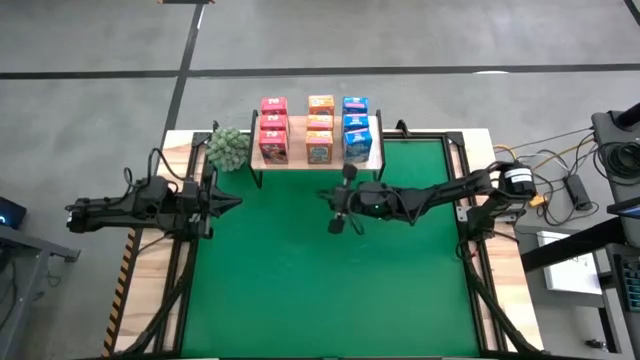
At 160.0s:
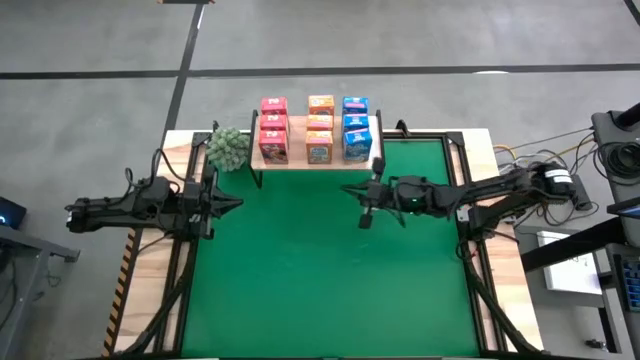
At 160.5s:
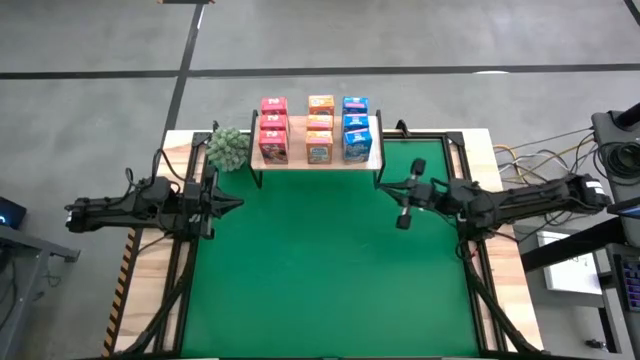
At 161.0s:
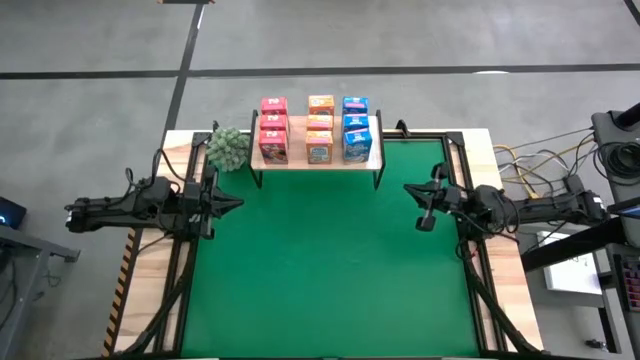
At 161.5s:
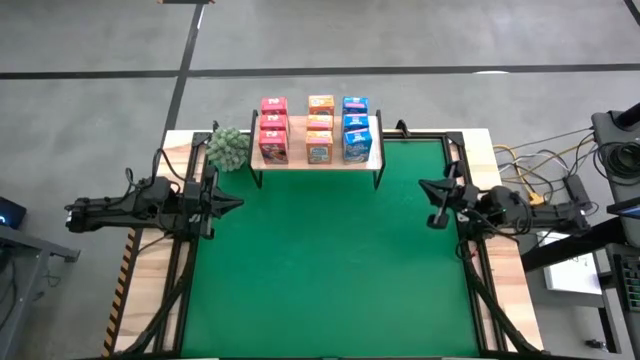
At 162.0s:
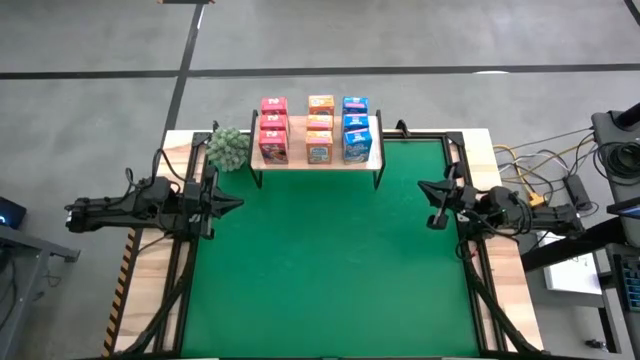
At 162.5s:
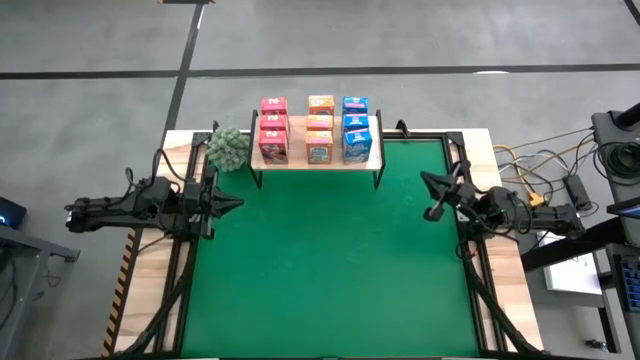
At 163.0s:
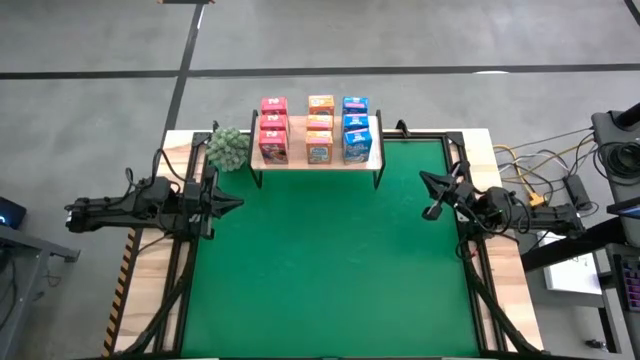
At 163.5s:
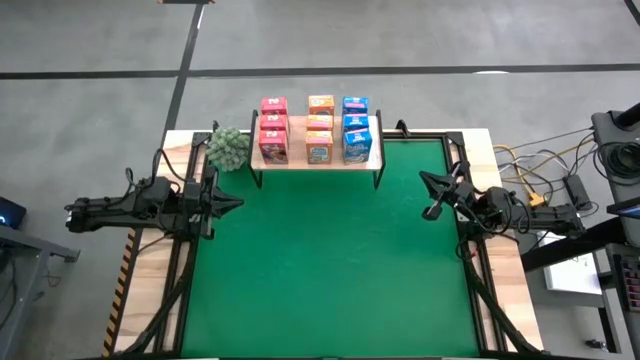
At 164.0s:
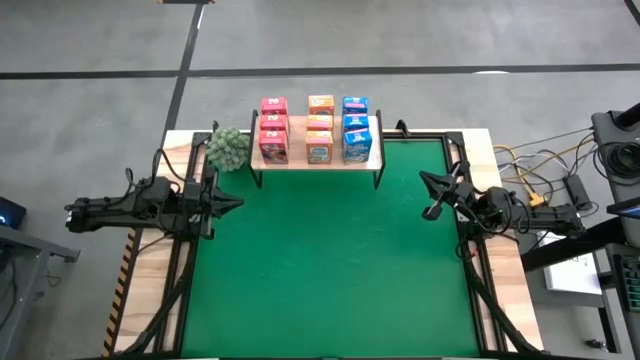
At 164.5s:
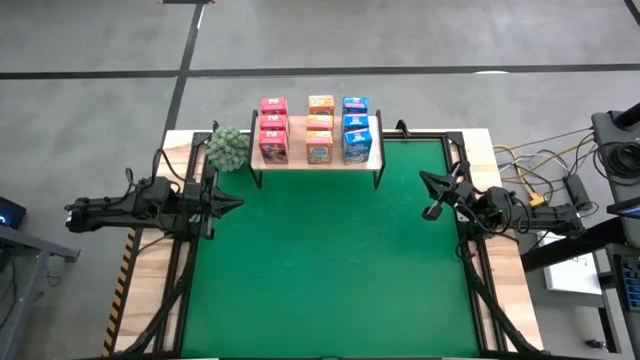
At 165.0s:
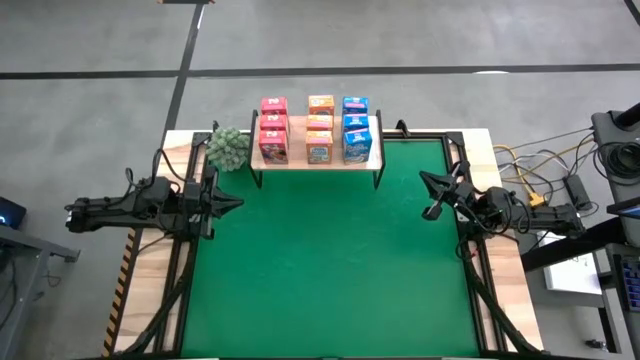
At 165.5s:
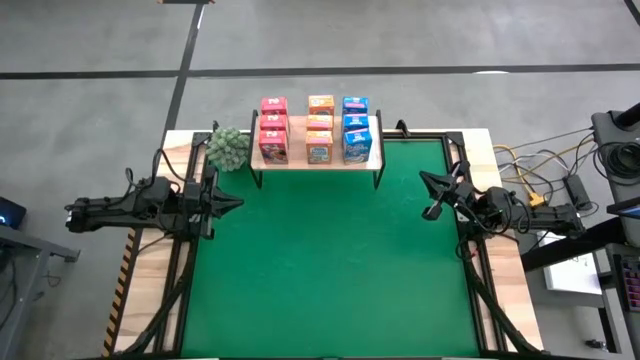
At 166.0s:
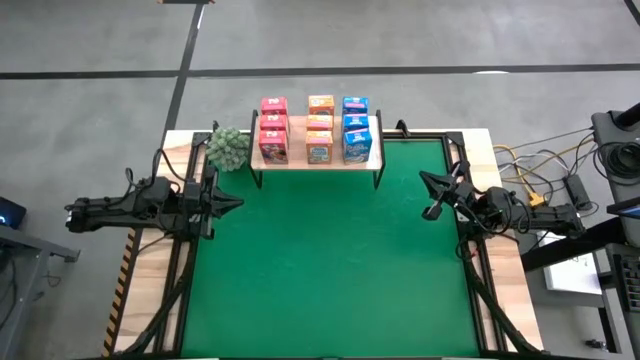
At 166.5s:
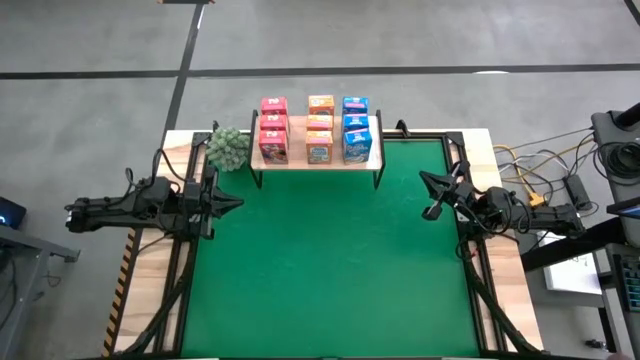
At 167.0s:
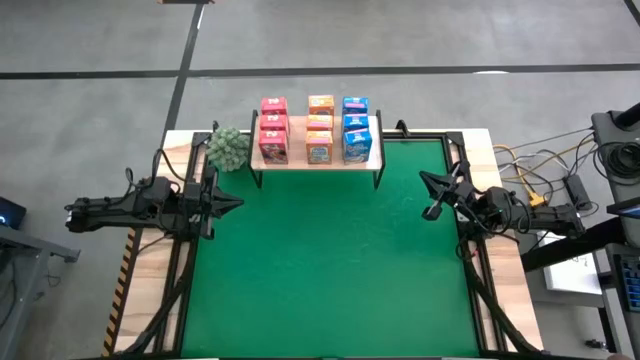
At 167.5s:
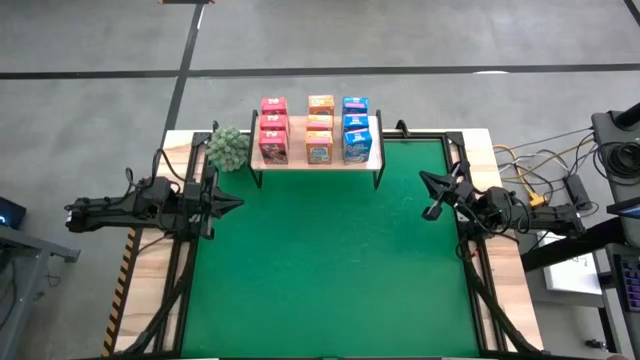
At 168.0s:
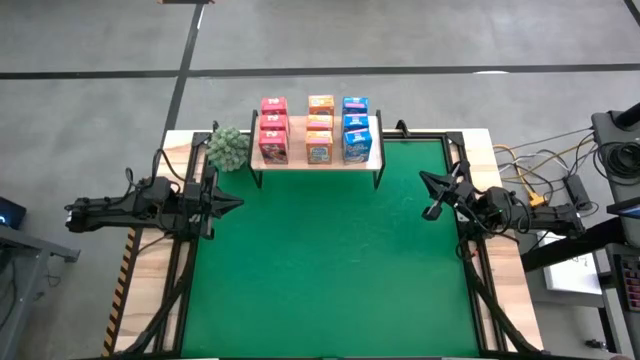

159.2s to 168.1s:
Task: Stack cereal on shelf
Return to home position

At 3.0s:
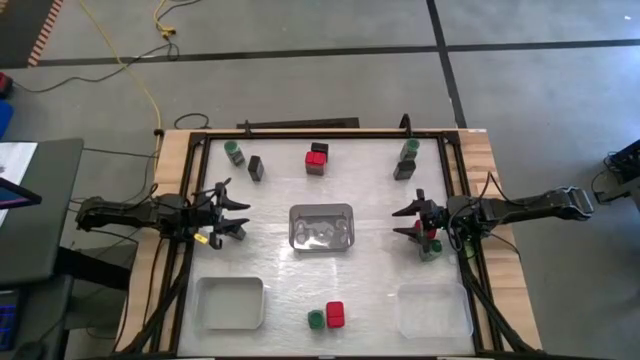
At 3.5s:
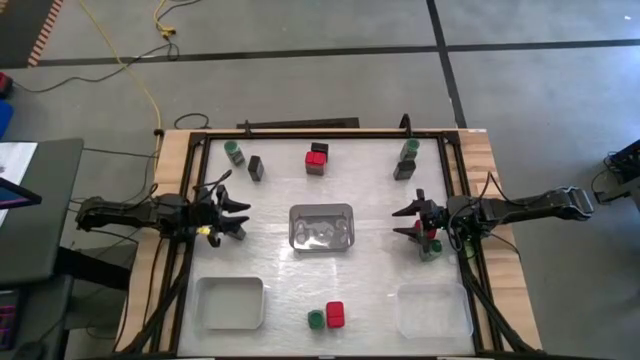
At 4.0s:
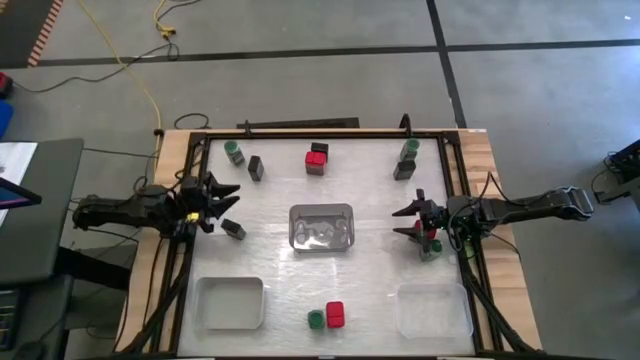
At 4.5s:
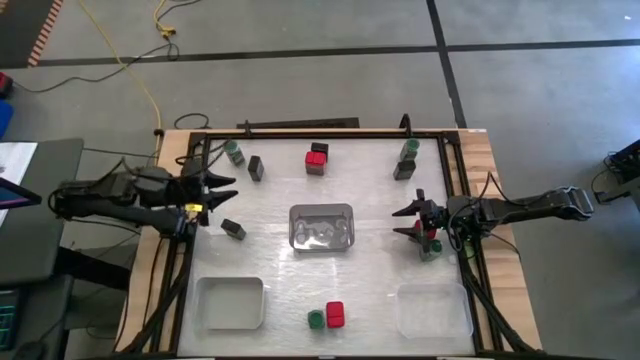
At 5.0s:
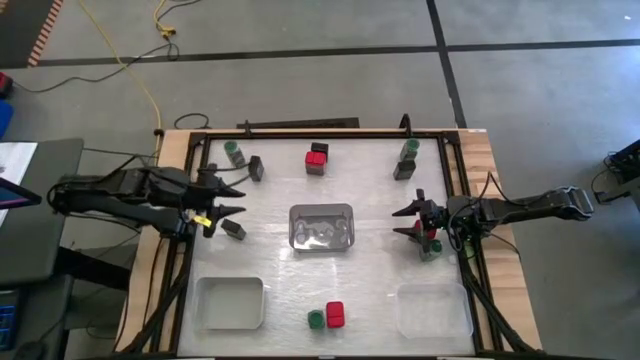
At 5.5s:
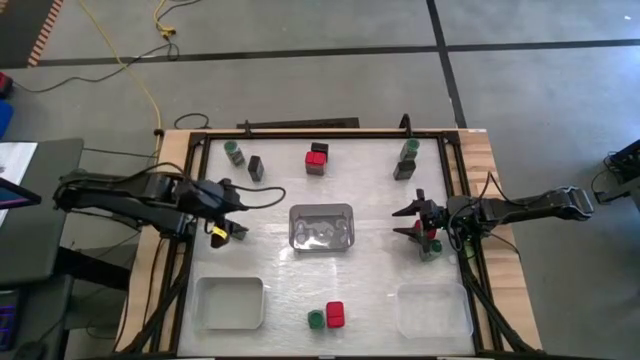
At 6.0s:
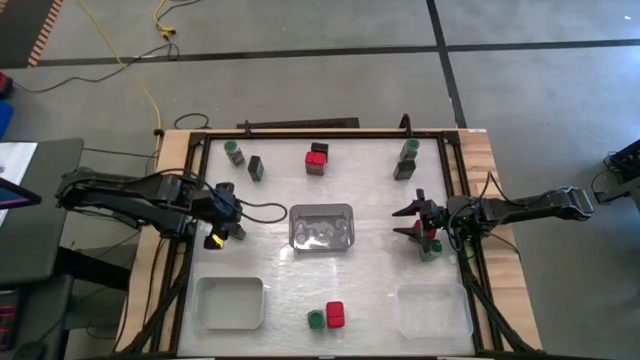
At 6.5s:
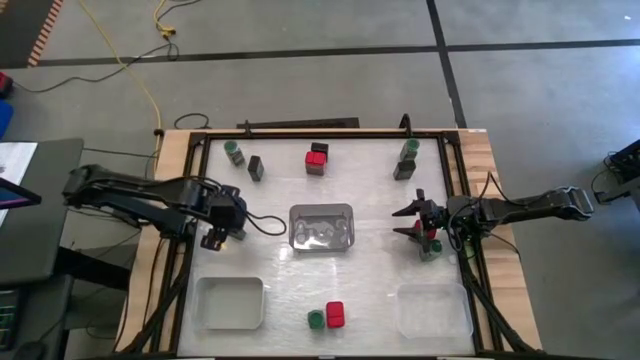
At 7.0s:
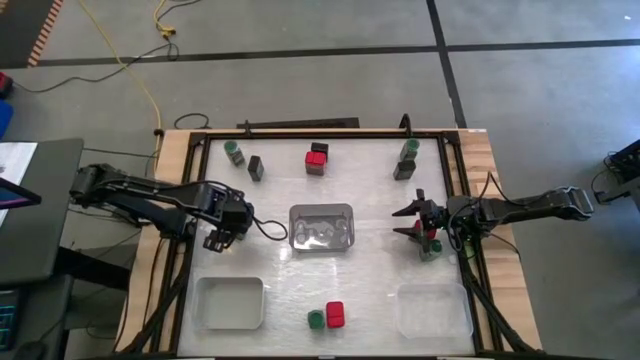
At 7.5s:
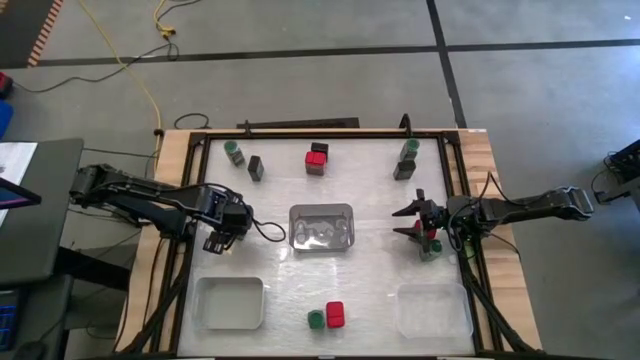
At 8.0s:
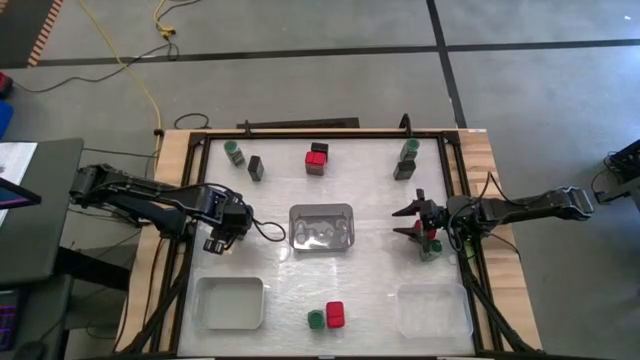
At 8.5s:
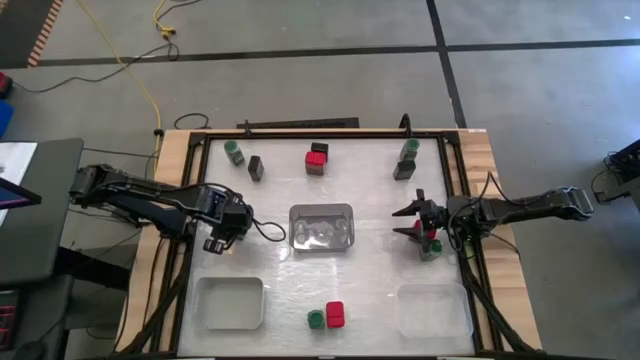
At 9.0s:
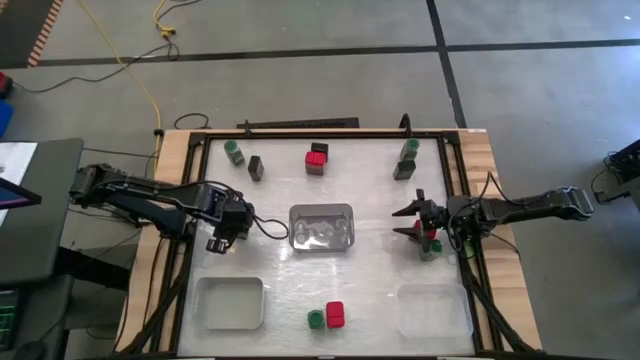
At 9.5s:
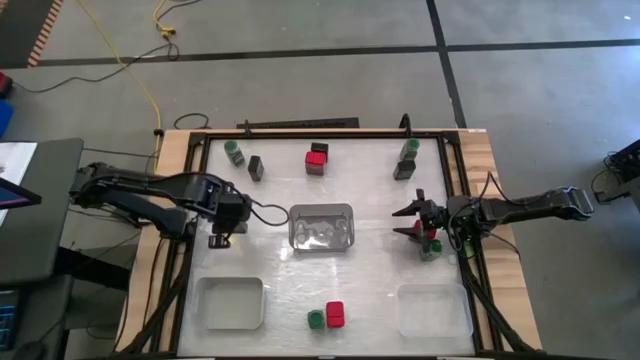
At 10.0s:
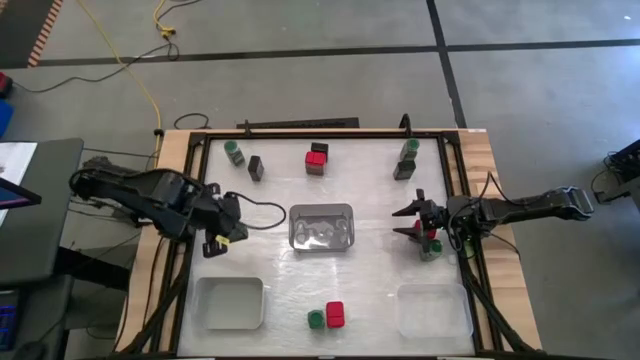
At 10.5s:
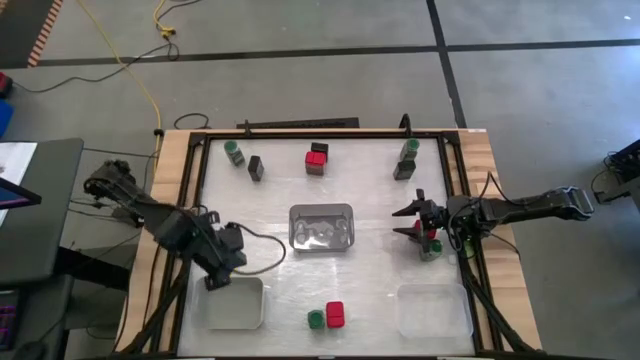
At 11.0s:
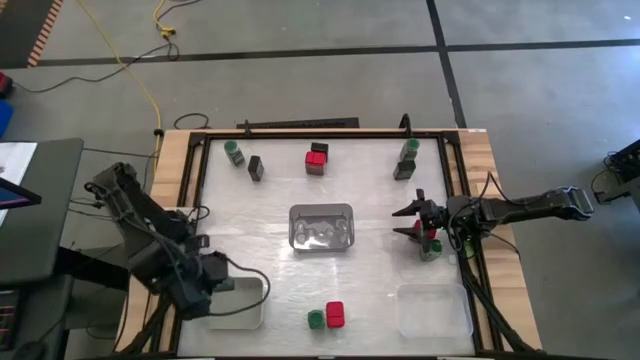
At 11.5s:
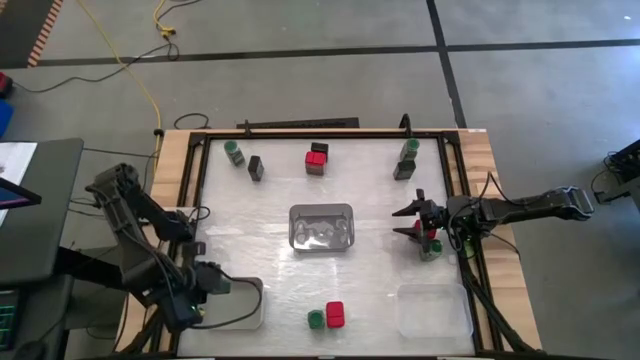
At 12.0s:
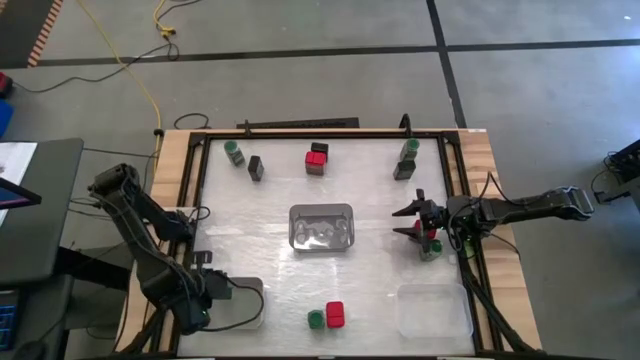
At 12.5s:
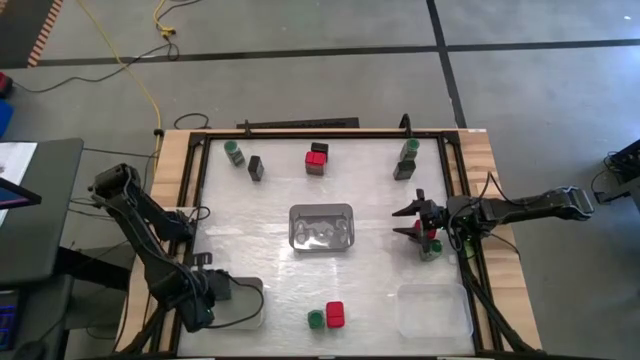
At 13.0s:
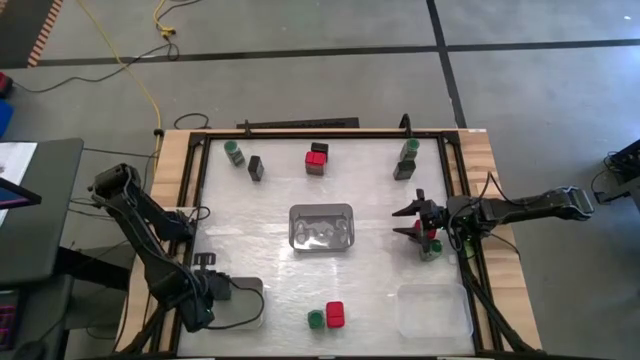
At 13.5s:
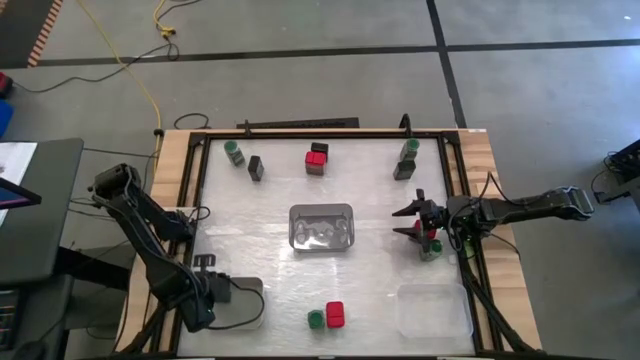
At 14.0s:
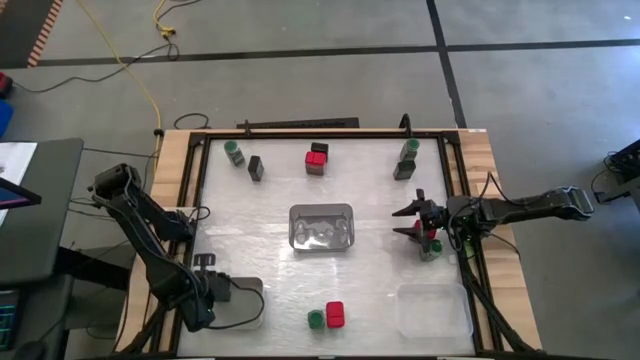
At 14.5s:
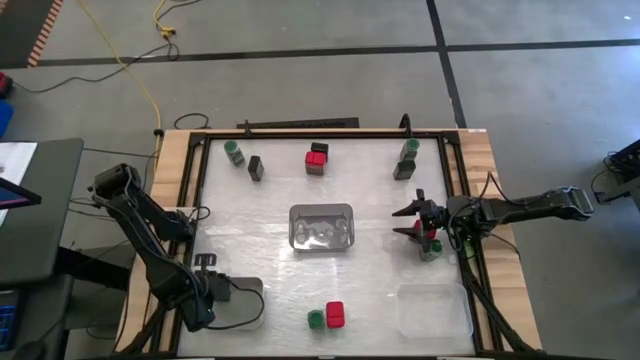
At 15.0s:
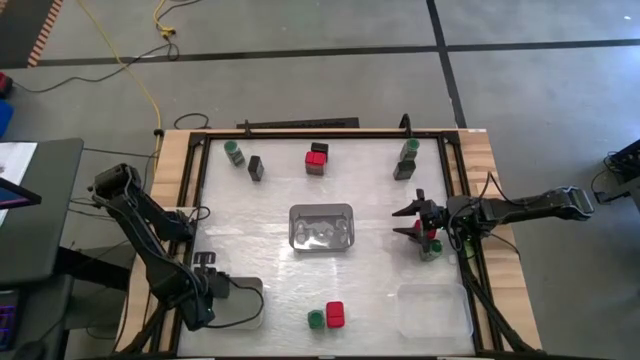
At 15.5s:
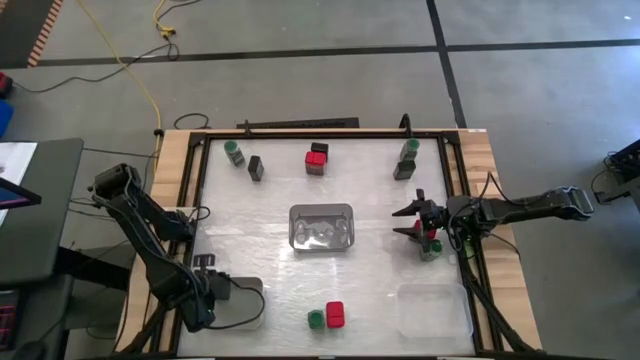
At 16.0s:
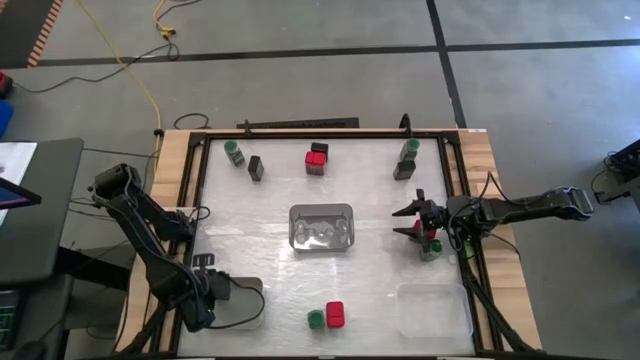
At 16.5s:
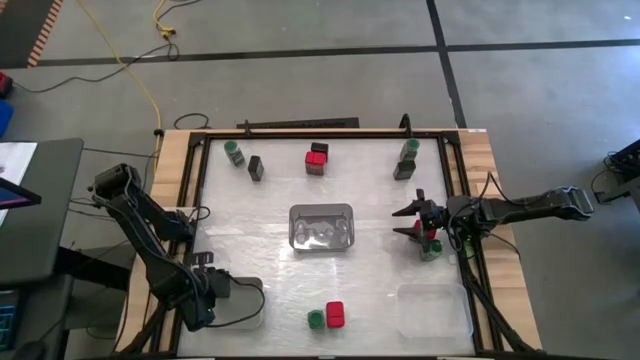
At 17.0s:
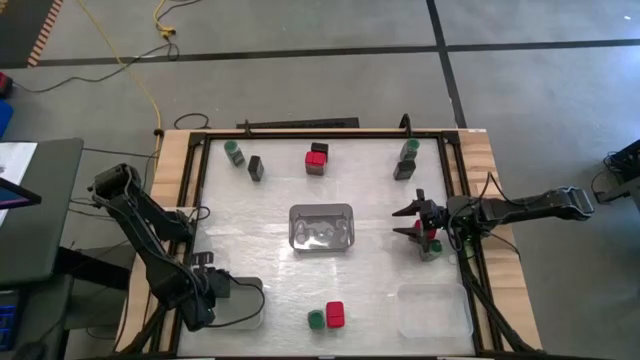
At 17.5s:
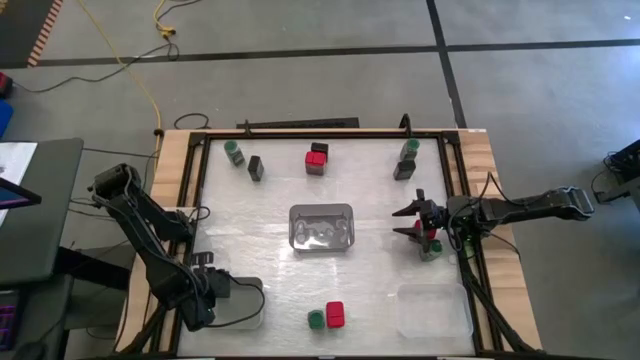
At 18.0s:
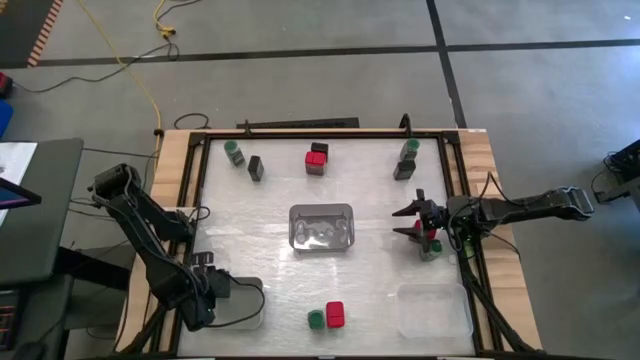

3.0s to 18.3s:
Task: Sort spices by type
Put the bottom left black seasoning can into the grey bin
